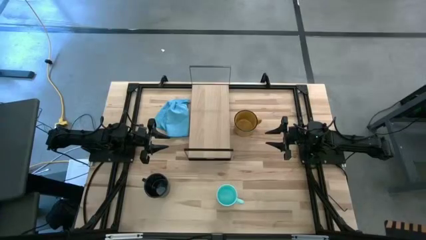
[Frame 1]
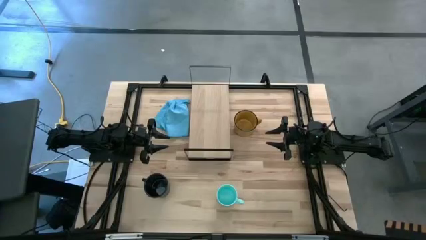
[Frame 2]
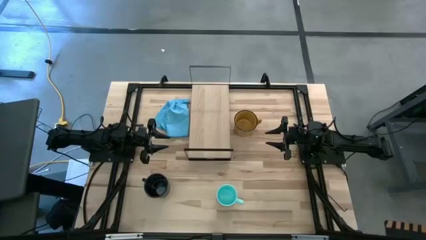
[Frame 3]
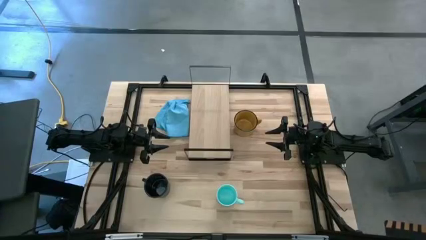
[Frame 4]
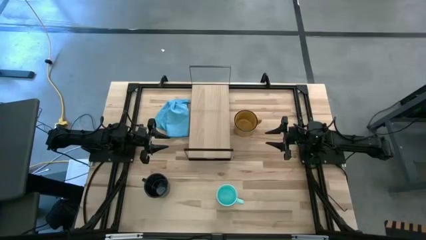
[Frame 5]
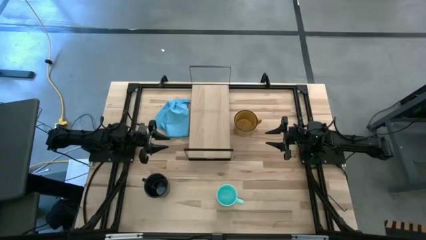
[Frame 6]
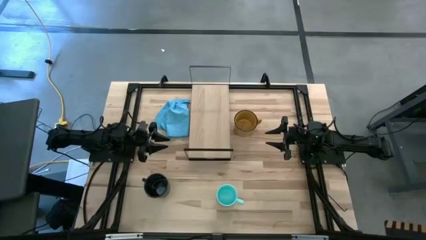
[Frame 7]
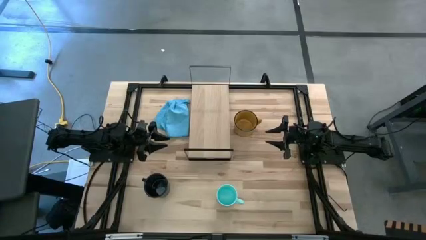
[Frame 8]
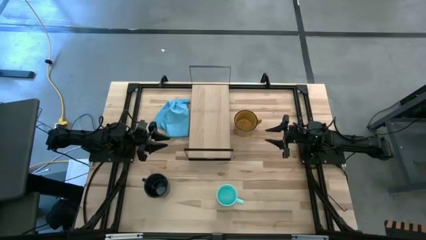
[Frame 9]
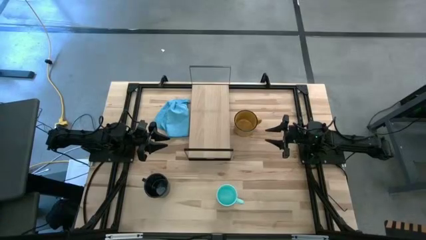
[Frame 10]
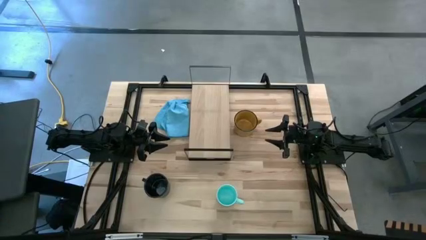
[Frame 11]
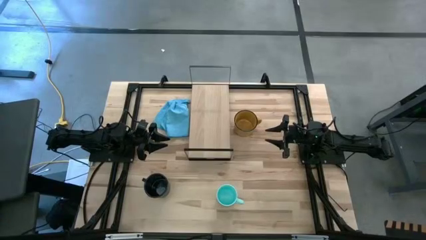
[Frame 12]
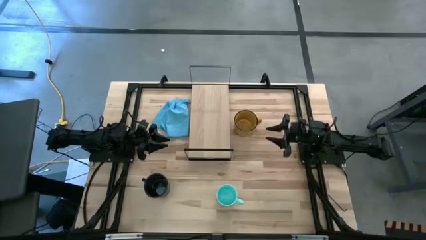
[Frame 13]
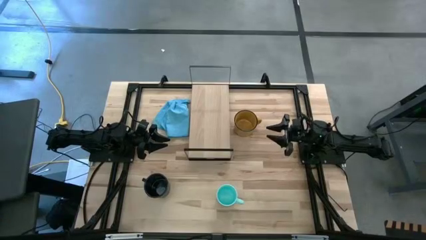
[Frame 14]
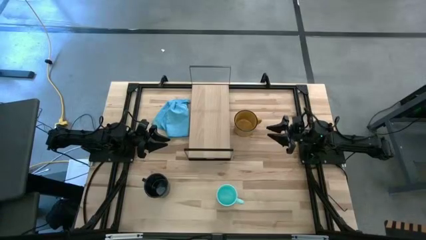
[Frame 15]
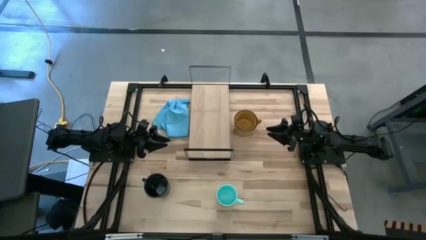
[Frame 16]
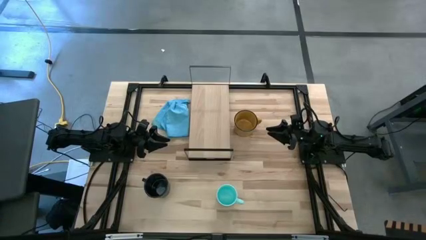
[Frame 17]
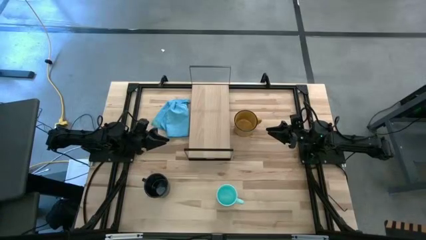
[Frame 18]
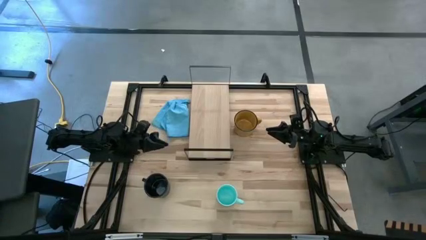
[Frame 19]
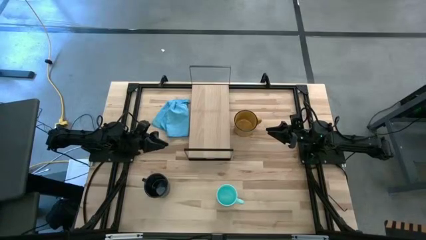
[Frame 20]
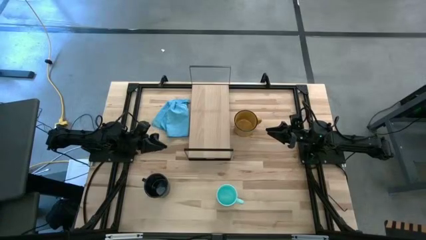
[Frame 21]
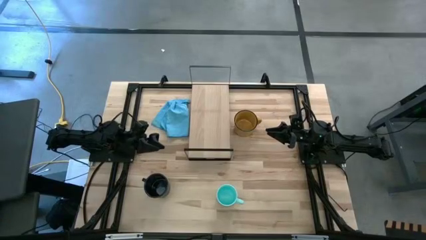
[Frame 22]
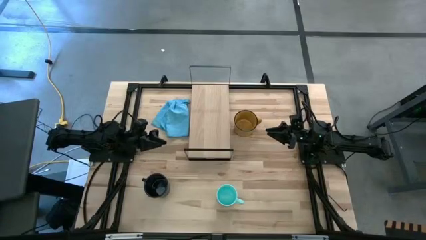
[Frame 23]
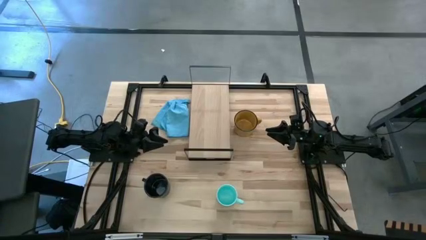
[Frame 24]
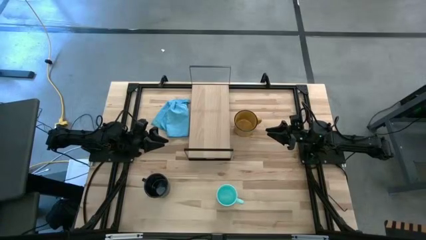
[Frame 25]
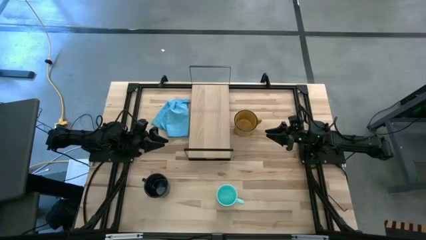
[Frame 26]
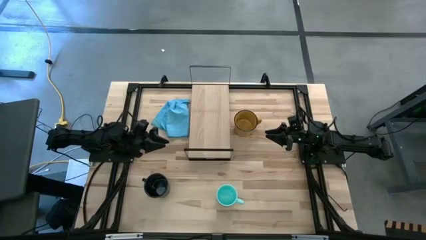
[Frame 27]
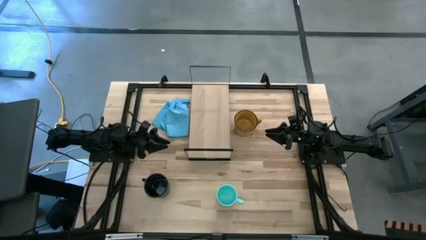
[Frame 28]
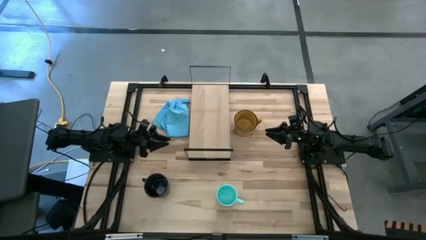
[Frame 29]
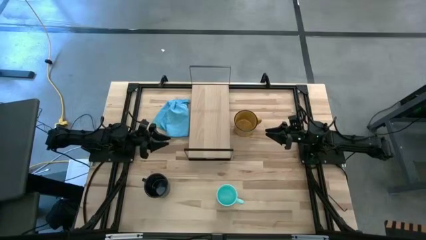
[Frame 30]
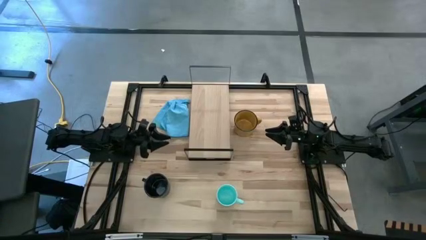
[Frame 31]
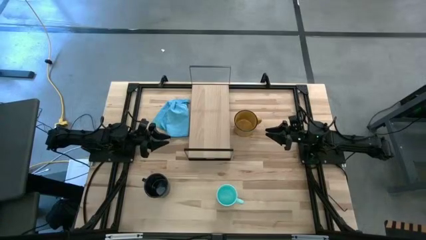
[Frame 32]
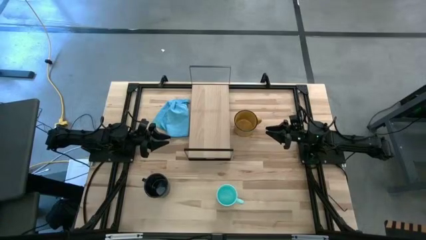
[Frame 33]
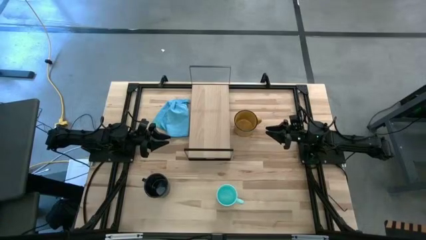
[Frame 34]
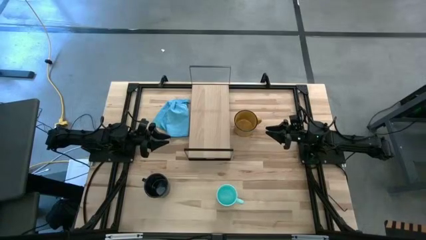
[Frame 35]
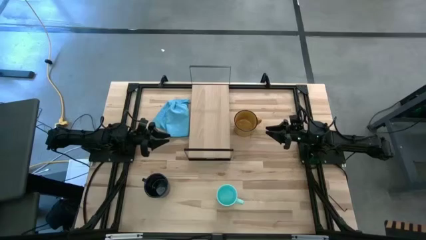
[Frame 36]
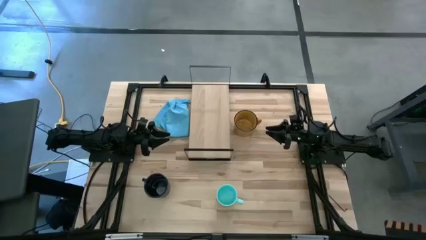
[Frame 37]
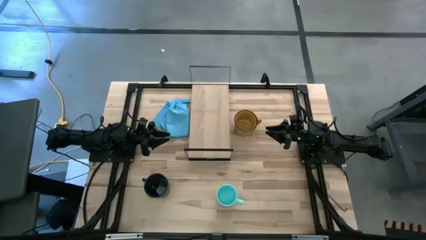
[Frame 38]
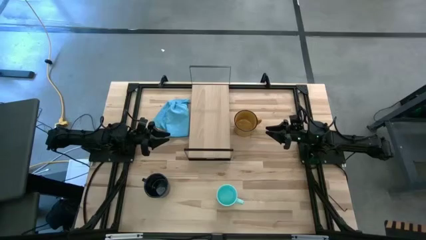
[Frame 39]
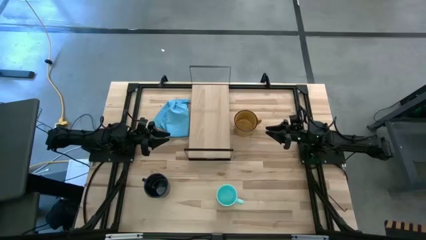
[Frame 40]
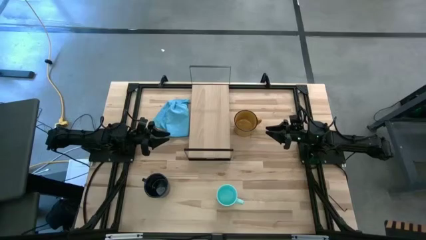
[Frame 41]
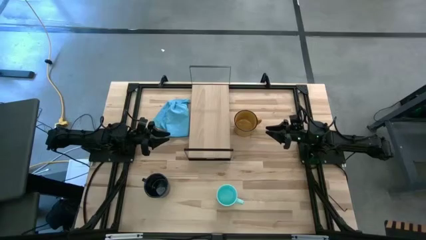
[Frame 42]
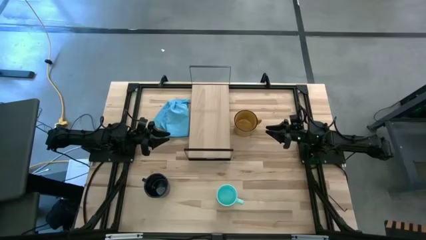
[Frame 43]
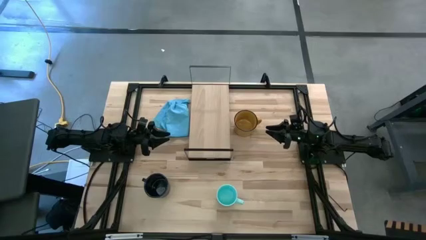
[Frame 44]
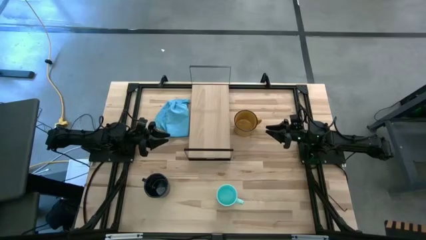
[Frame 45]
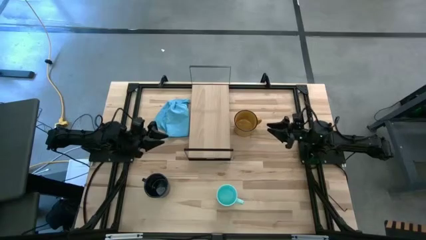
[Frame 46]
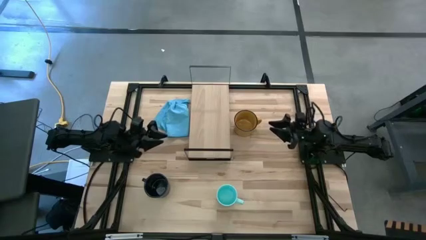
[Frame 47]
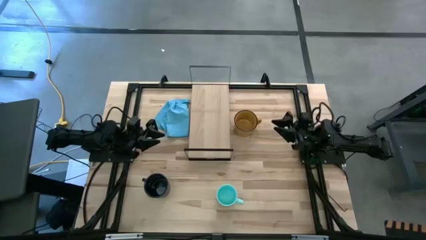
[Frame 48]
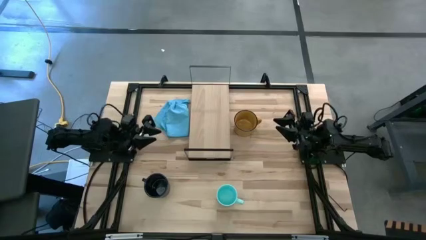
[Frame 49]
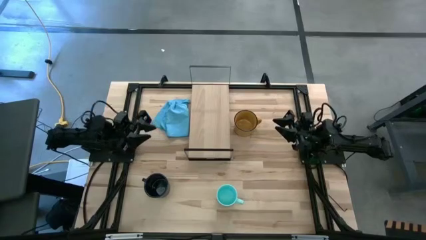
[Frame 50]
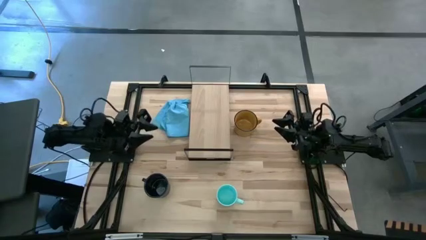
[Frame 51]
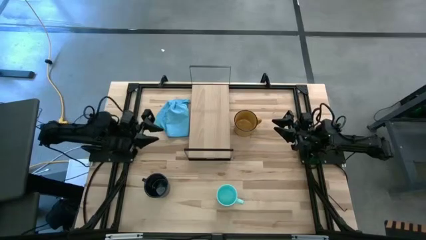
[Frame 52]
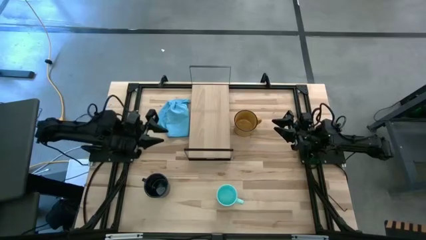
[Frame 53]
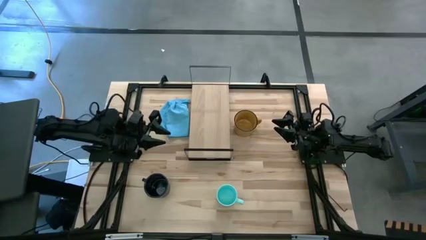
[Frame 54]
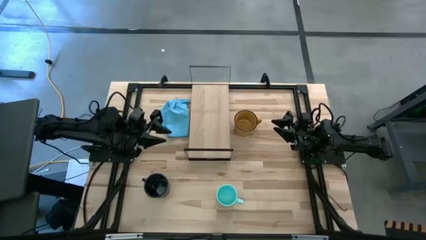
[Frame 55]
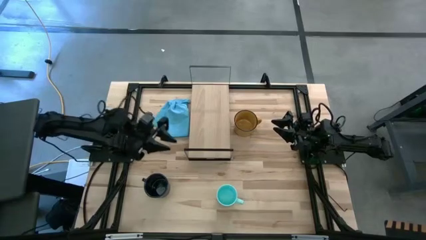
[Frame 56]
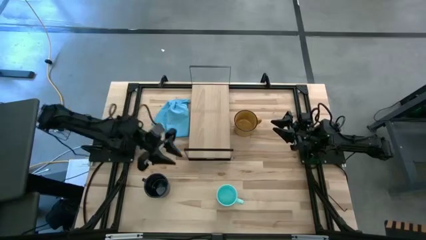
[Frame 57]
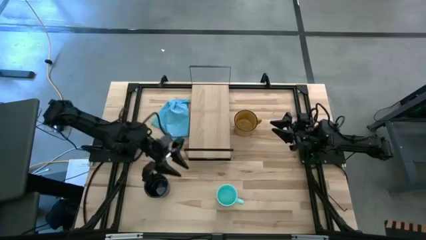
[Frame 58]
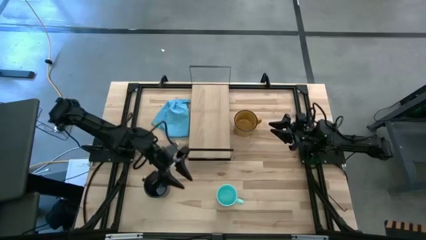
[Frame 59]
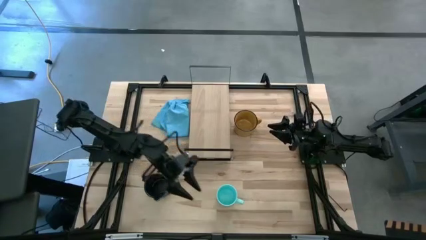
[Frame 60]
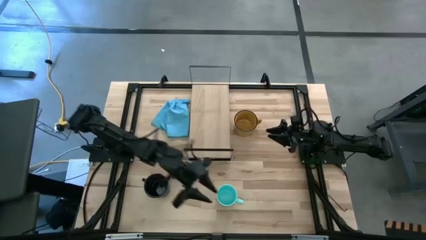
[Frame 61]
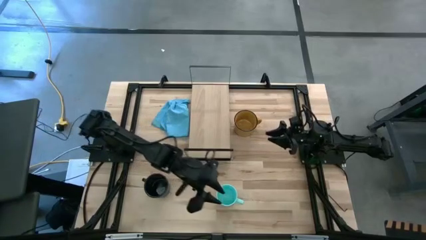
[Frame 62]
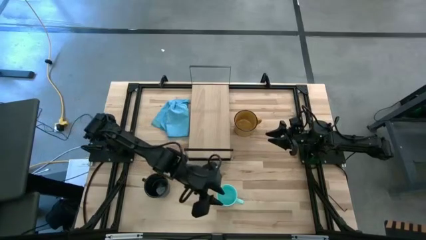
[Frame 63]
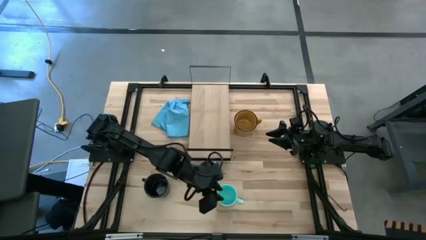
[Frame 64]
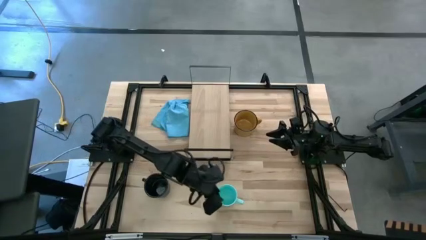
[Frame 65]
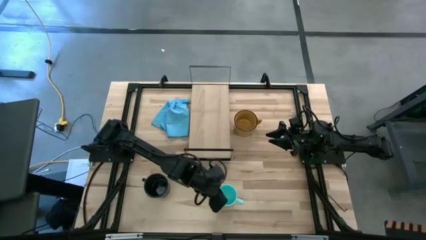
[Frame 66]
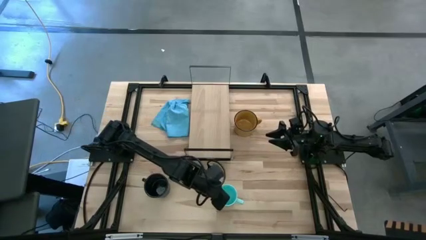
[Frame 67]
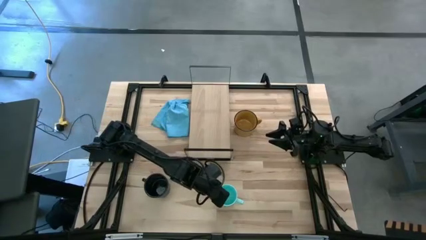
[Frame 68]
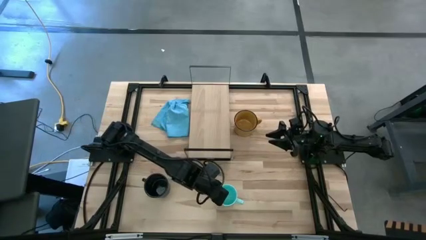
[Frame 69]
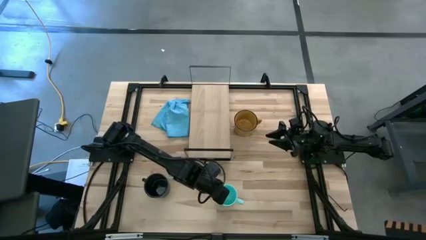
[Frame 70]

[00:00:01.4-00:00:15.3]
Task: Stack small to large cups/mugs on shelf
Put the light blue mug on the shelf
